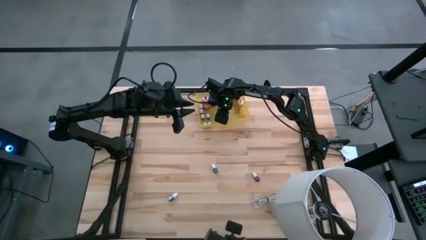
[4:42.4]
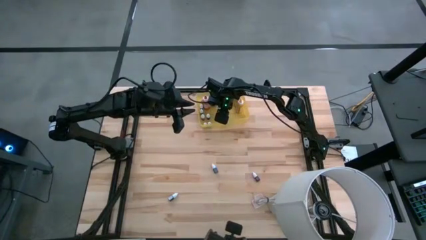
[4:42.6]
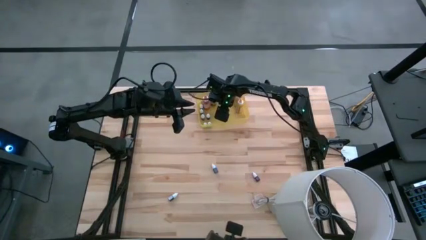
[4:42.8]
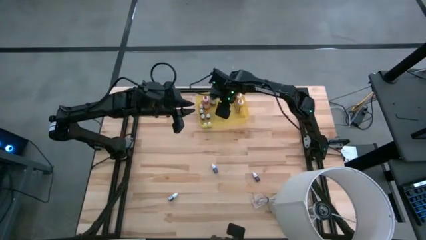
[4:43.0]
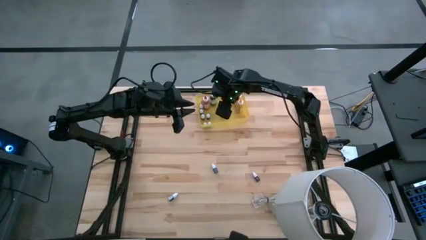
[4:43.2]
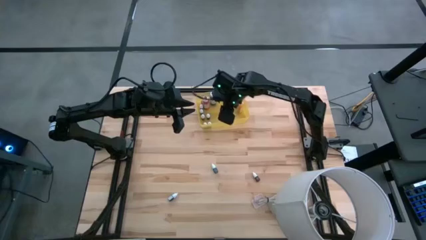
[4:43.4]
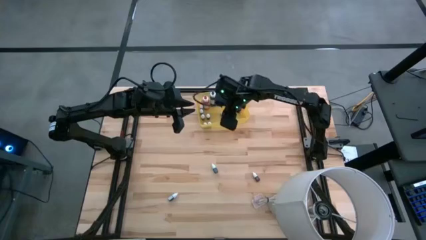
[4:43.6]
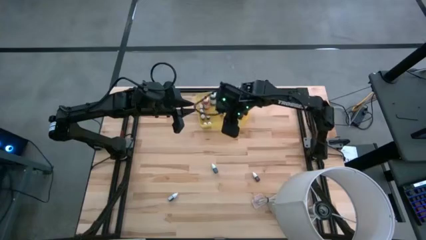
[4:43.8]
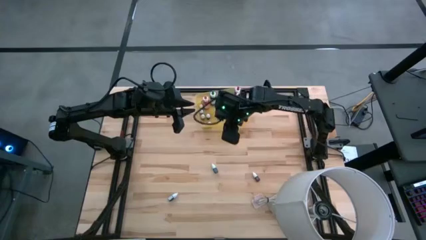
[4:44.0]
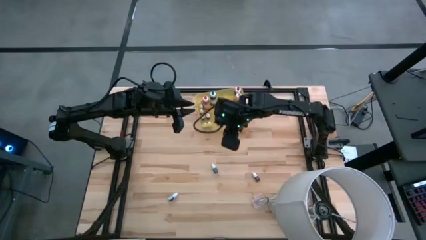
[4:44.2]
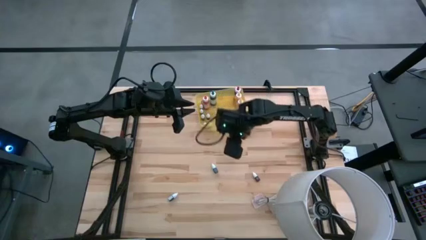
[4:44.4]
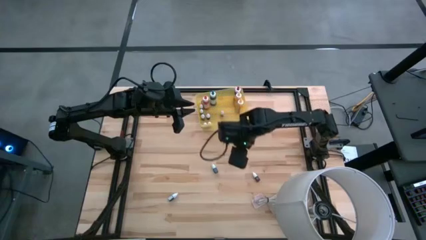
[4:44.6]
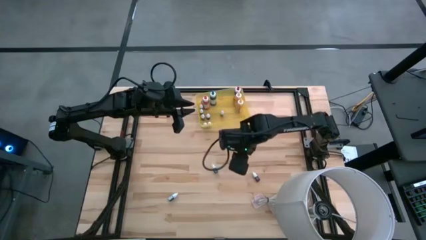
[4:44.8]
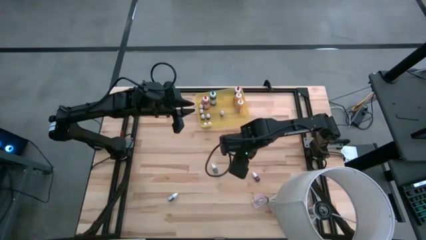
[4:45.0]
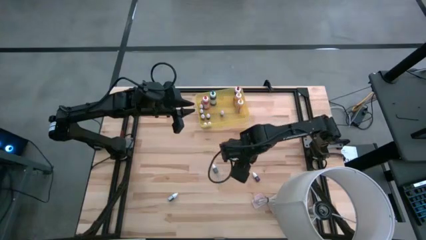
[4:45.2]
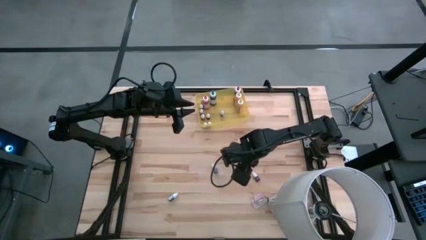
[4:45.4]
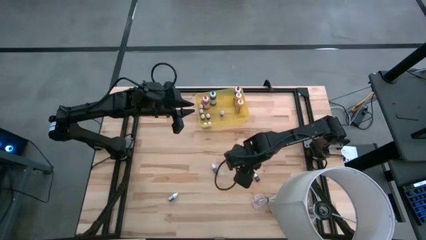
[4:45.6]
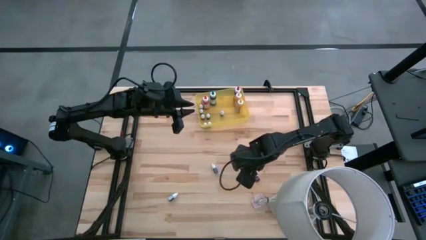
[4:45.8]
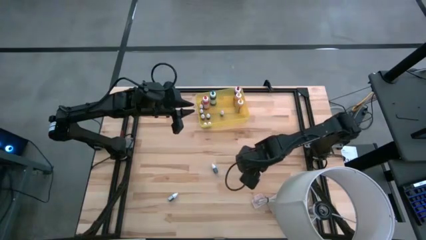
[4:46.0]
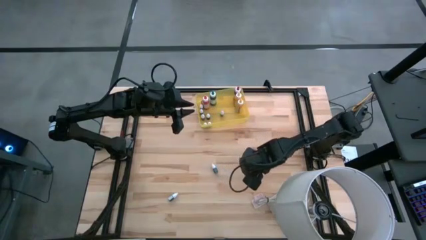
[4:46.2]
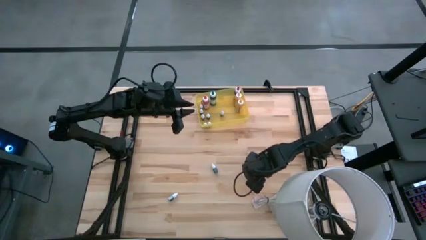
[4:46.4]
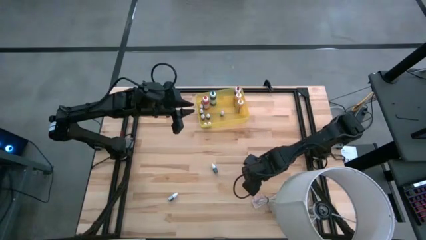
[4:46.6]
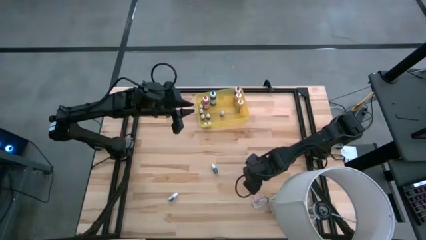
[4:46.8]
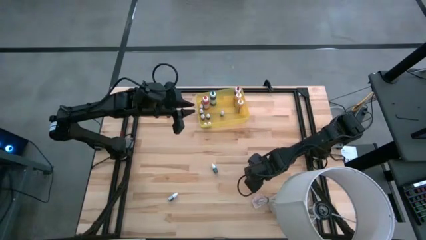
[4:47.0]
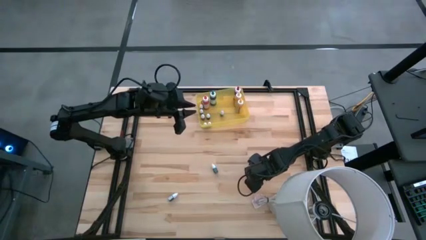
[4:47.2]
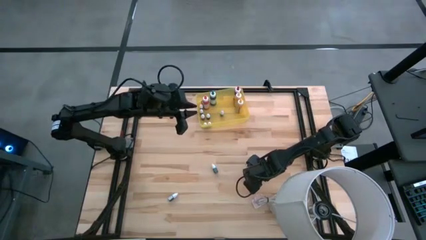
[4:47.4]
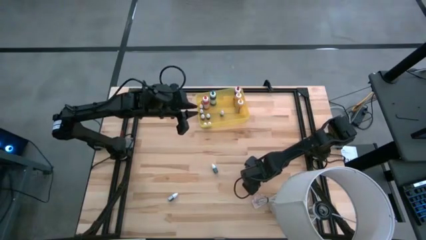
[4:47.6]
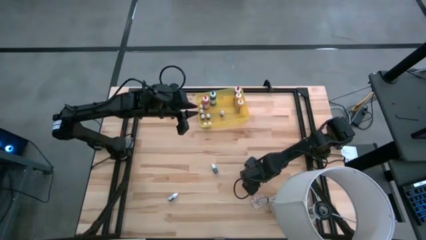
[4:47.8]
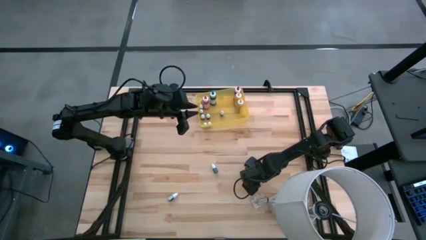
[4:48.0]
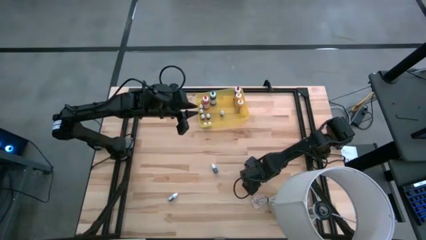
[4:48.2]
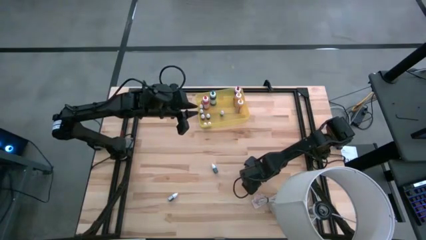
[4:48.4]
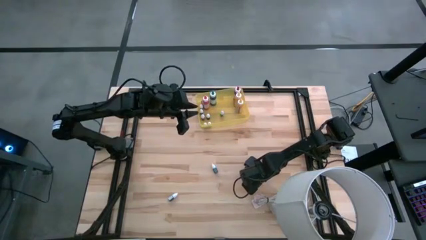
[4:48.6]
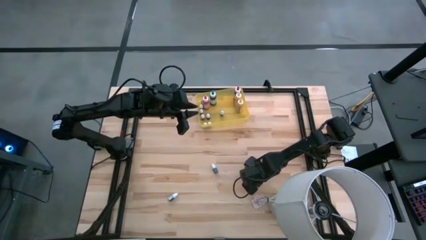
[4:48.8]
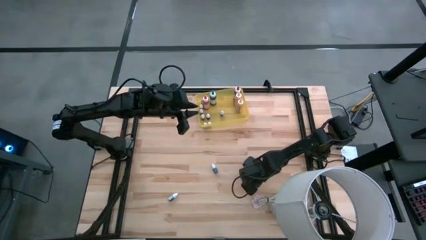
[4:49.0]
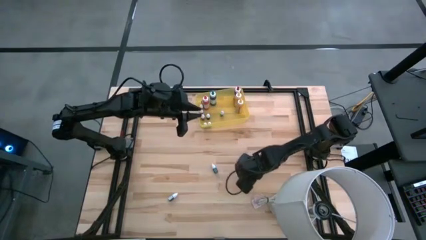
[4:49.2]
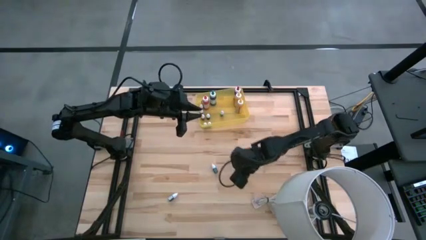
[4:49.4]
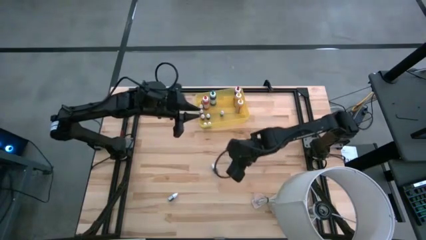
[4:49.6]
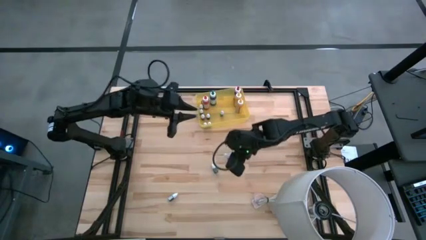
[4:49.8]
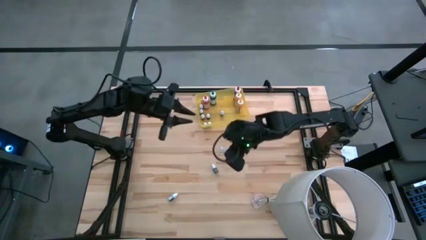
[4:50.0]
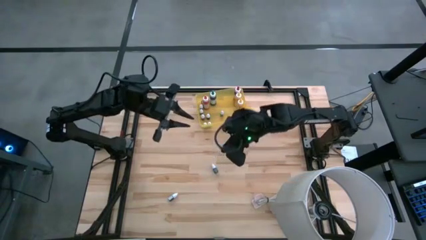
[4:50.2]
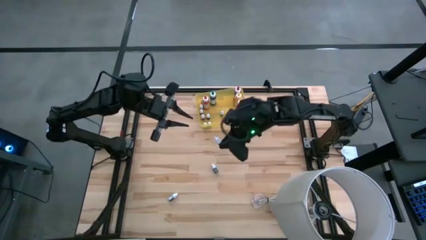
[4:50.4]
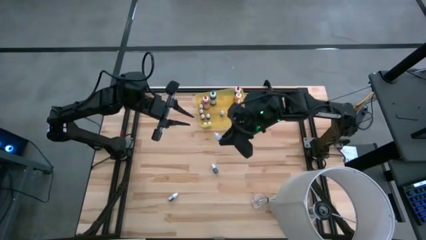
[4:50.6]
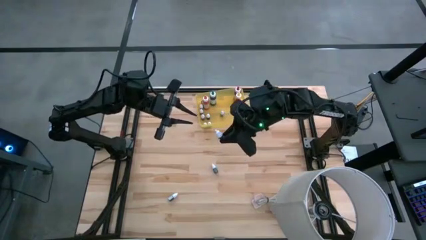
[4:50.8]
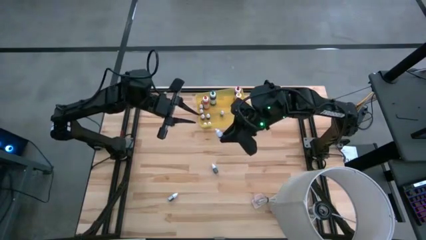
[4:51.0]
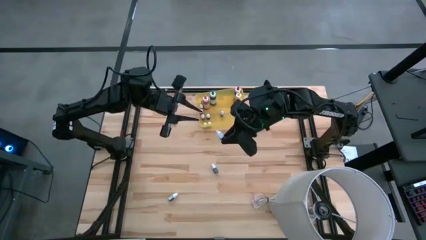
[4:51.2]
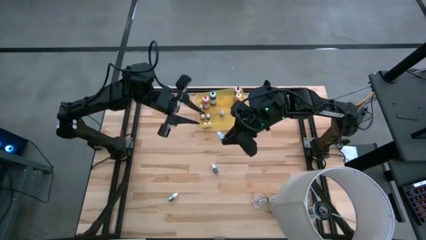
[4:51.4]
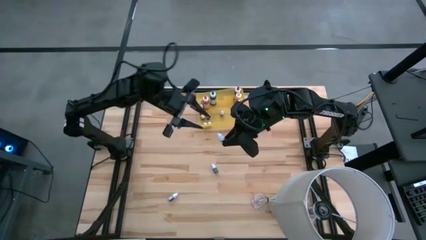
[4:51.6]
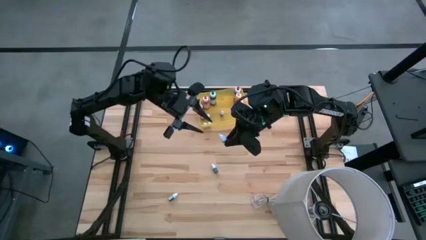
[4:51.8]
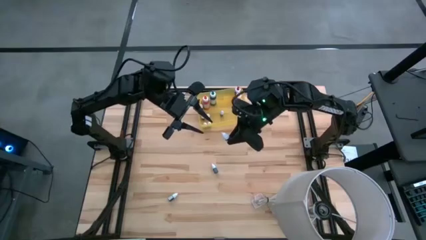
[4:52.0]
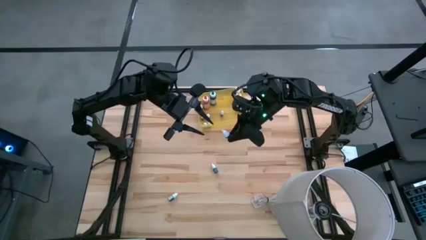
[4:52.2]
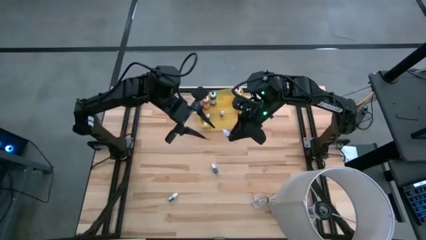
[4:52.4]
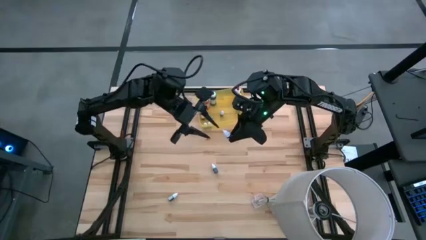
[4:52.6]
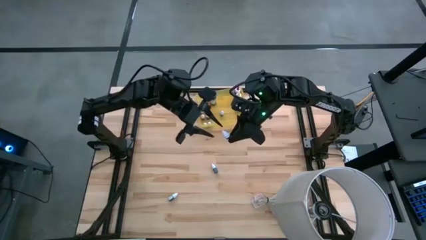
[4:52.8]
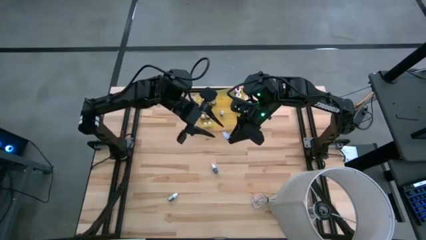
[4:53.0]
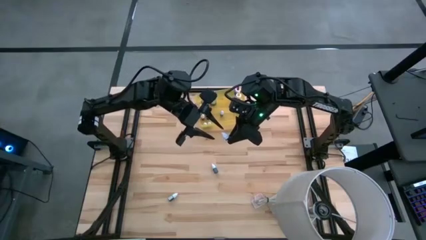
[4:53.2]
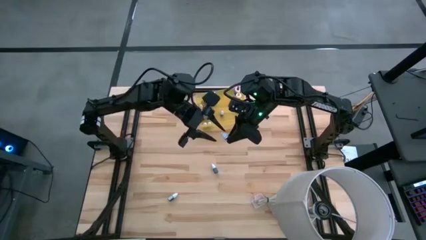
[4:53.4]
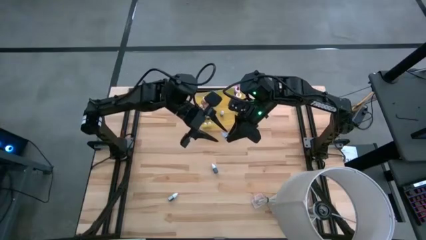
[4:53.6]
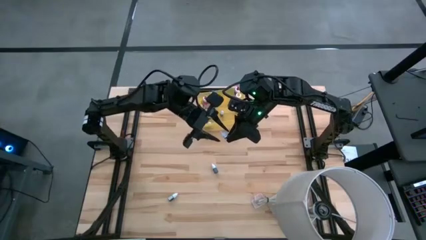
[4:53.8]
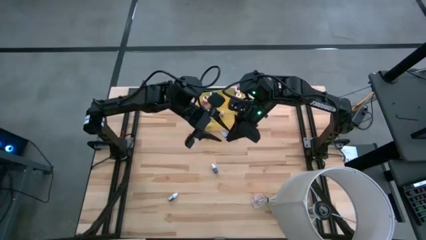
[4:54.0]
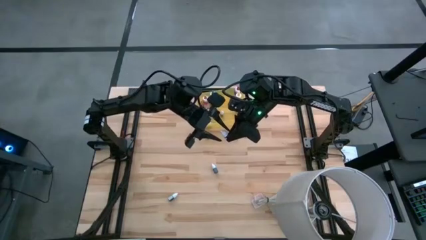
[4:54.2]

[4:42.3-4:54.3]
Task: Pick & Place food coloring
Put the small orange food coloring bottle into the yellow bin
